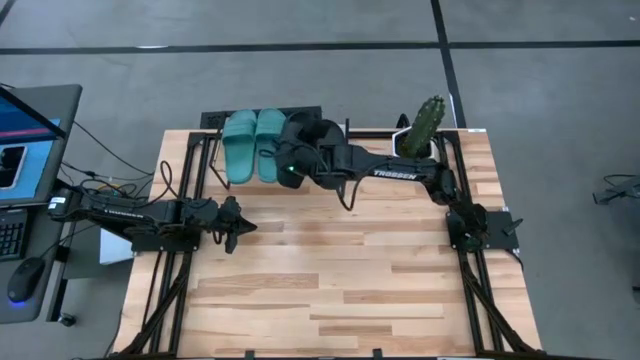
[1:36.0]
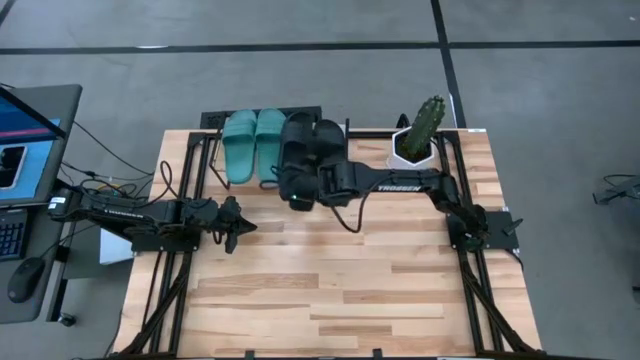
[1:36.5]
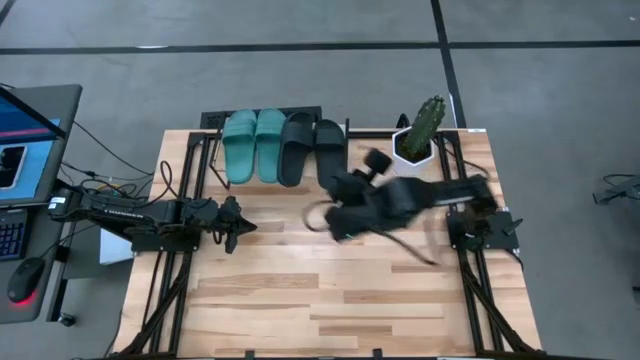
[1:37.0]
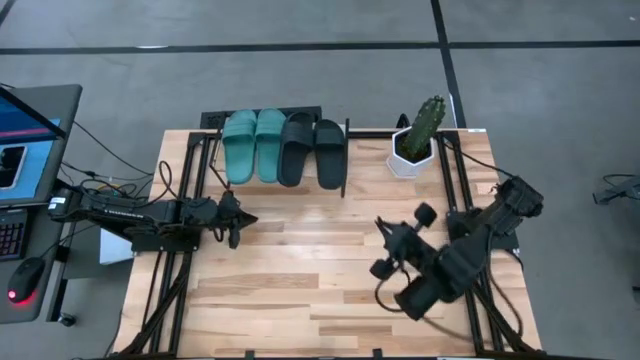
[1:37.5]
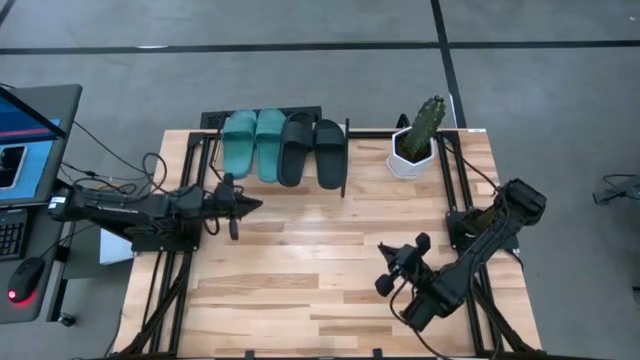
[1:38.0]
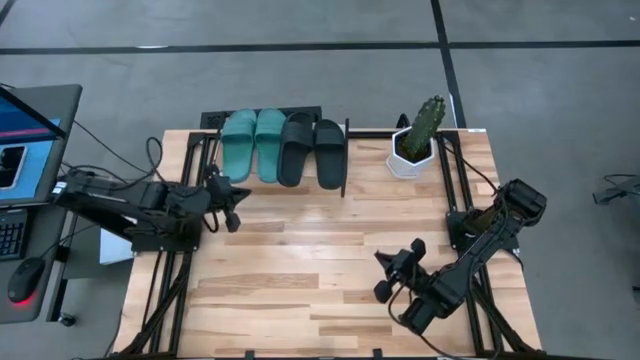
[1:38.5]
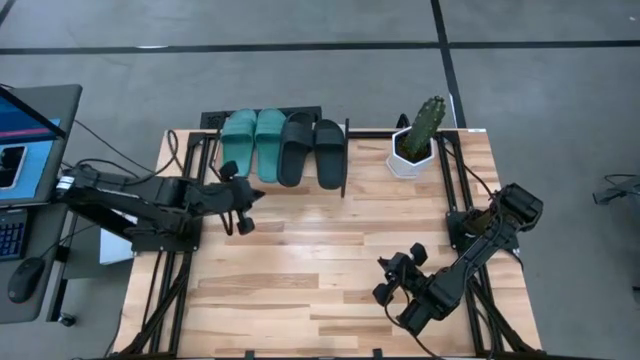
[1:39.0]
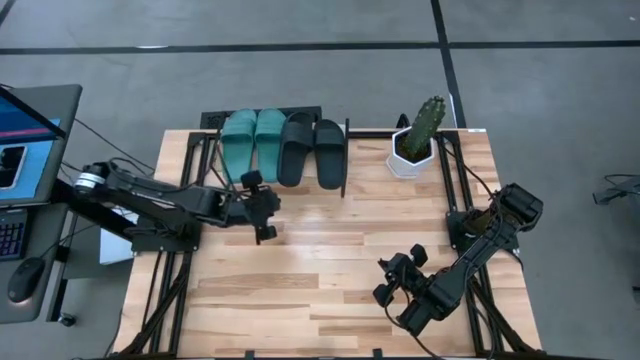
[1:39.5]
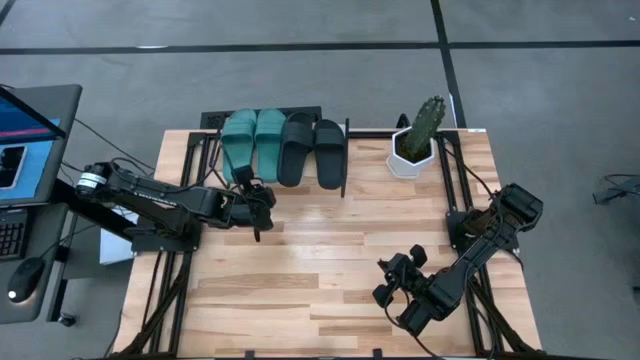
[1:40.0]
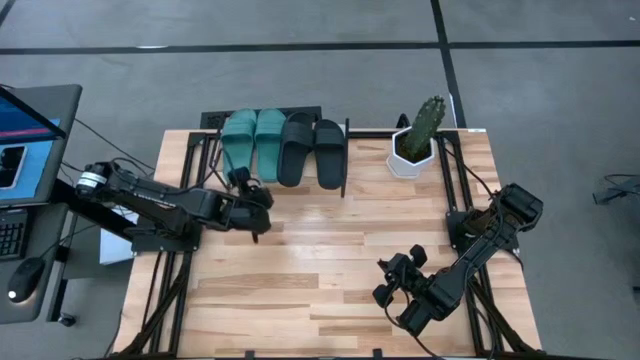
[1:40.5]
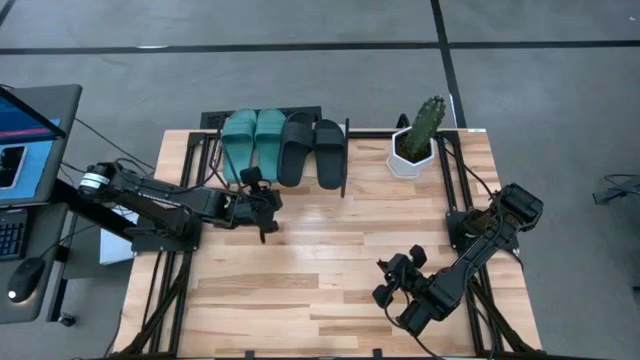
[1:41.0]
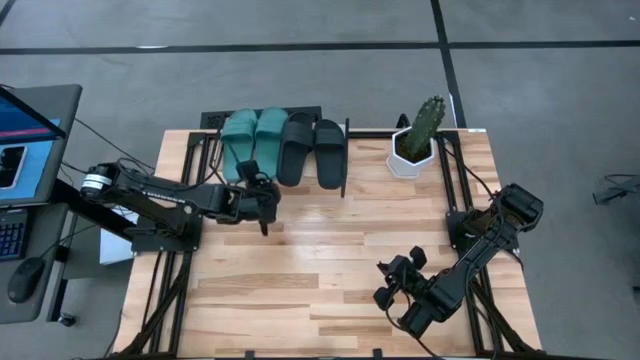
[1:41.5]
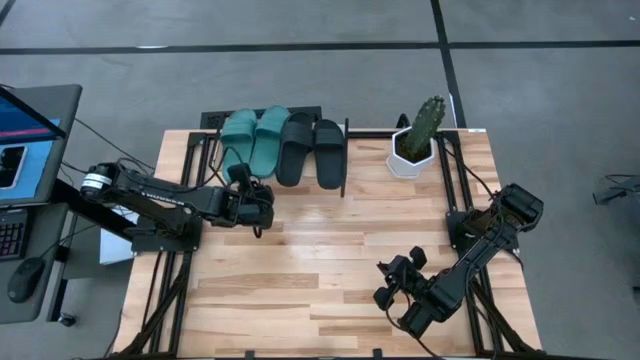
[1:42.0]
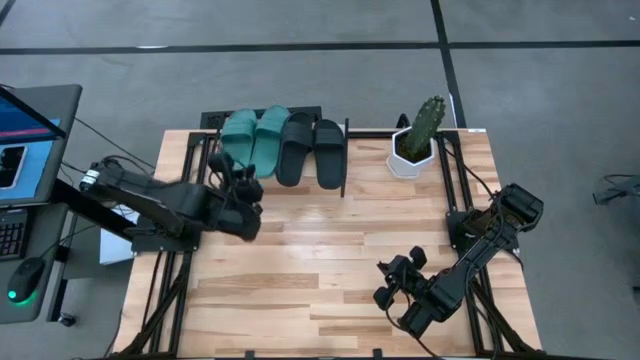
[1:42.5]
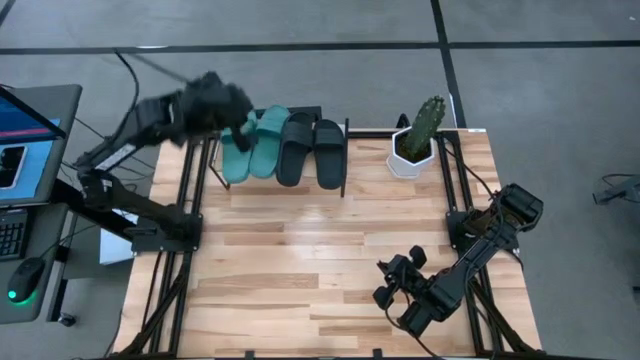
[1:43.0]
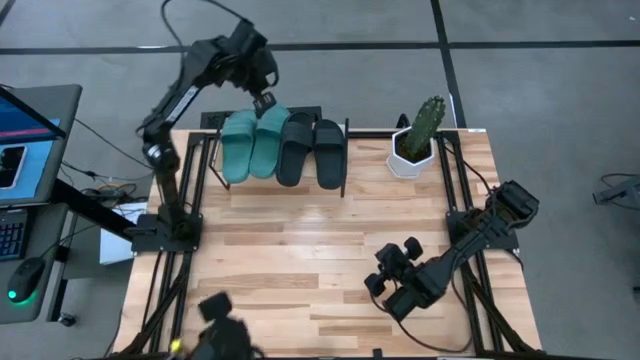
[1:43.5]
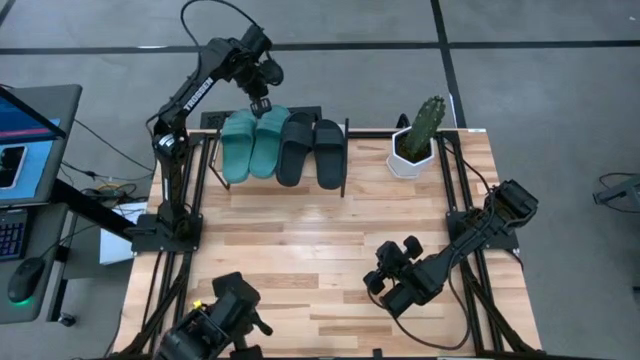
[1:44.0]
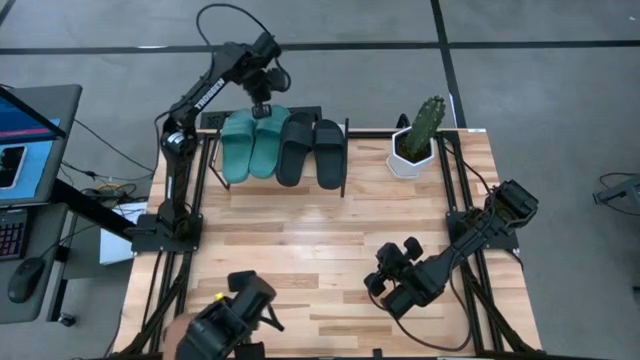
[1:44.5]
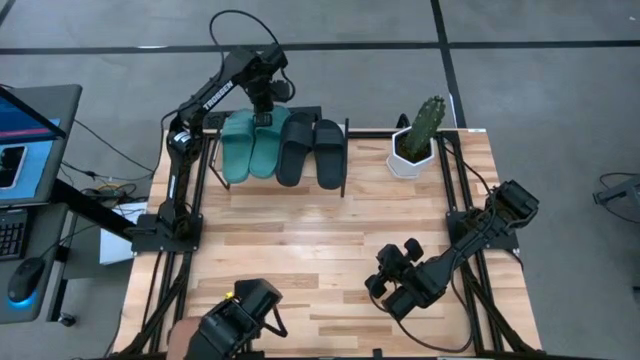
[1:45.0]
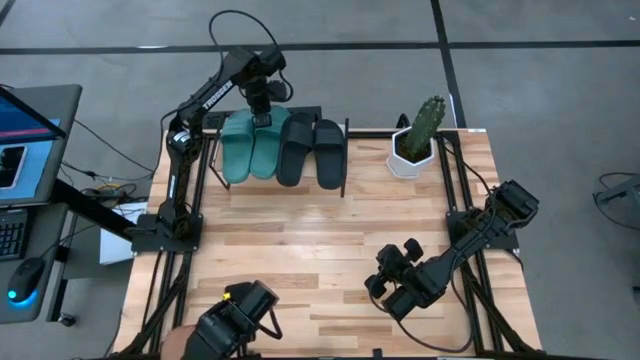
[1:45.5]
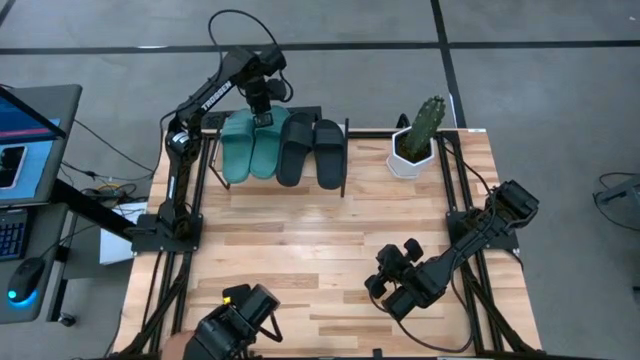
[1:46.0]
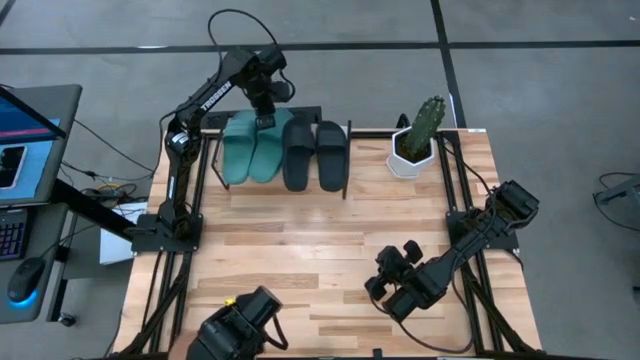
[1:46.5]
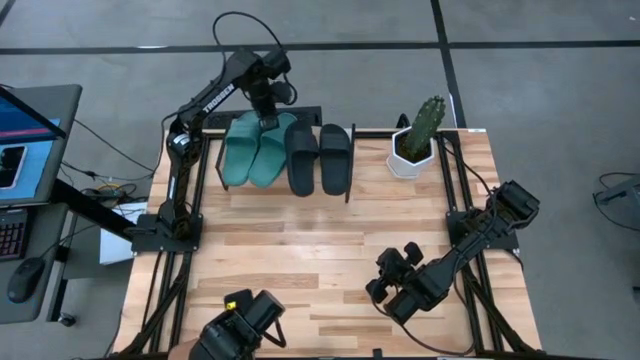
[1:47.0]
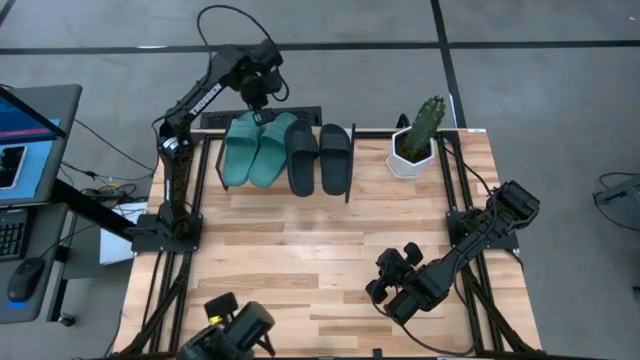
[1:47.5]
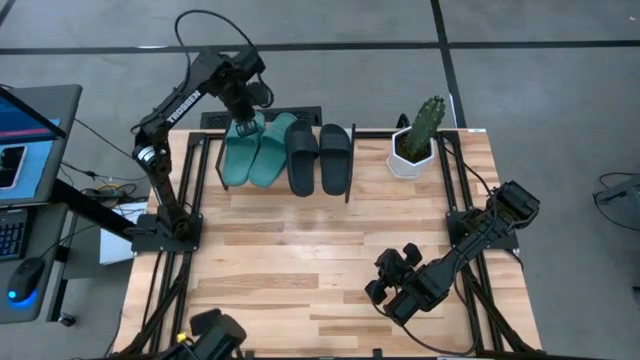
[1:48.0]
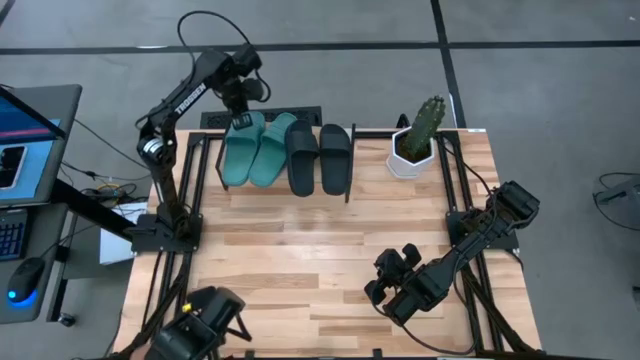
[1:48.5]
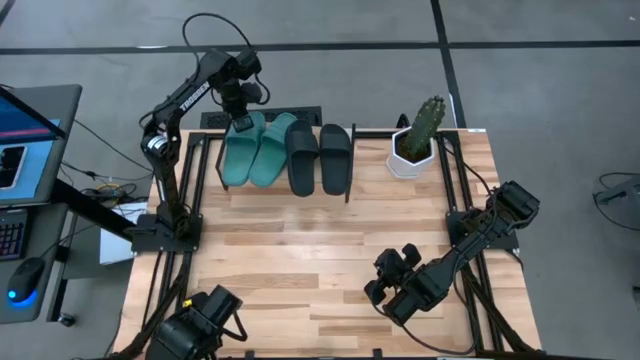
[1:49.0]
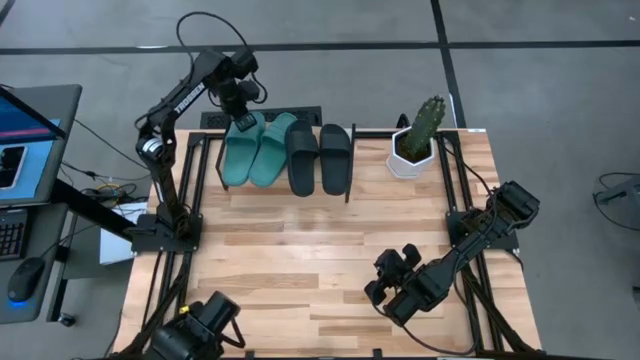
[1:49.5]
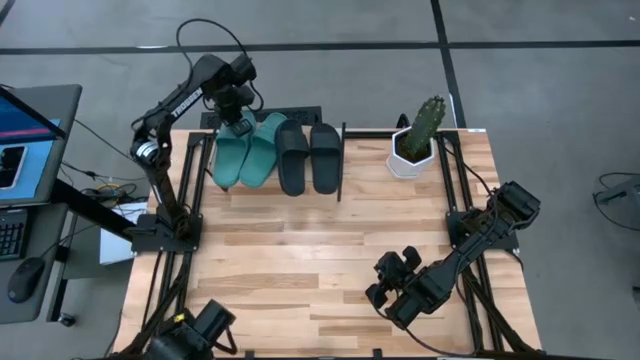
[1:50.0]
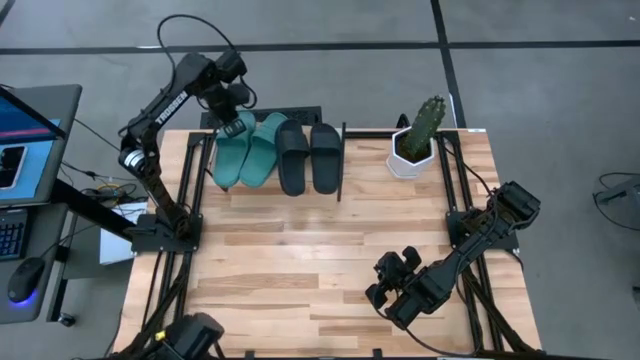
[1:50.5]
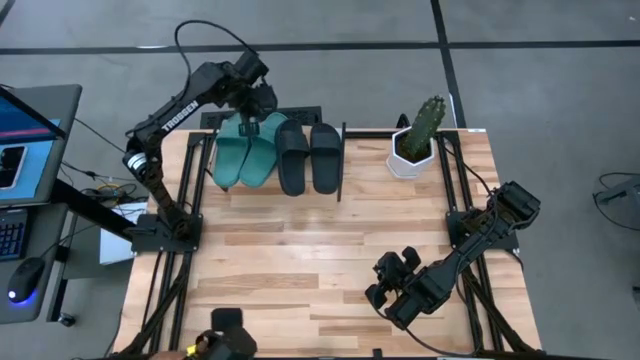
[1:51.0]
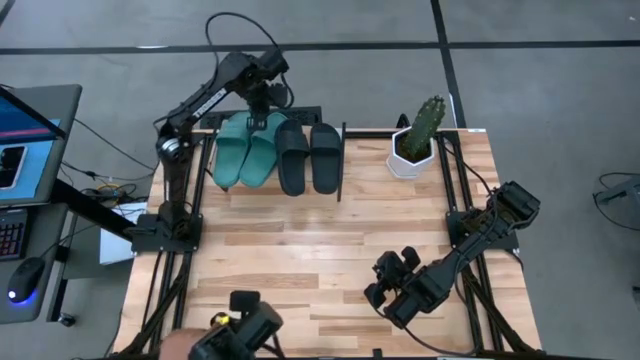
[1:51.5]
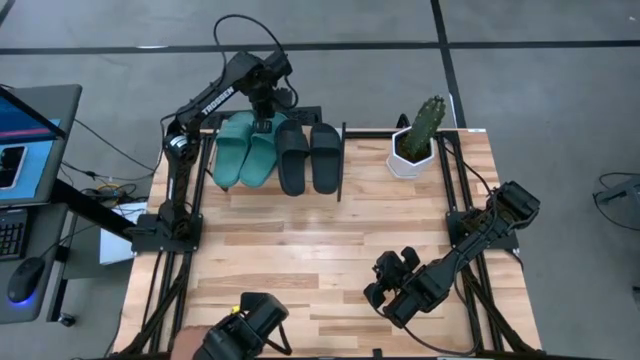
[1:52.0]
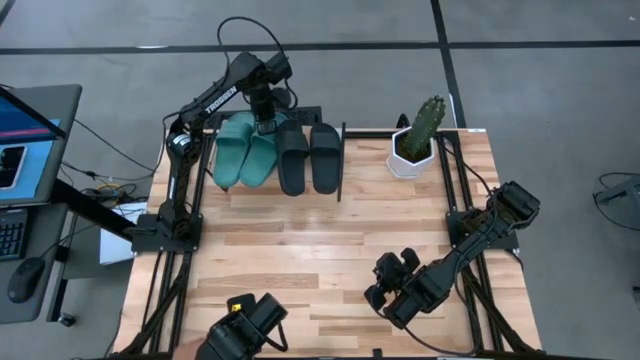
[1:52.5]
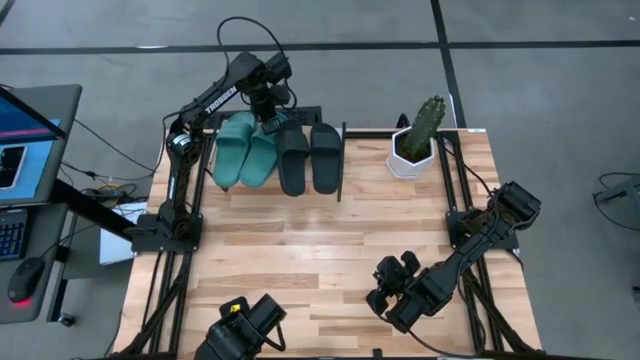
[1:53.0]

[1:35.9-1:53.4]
Task: Pick and place slides into the shelf
Adjust the slides on the shelf

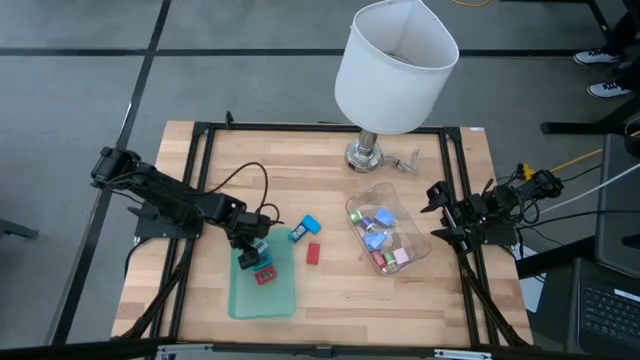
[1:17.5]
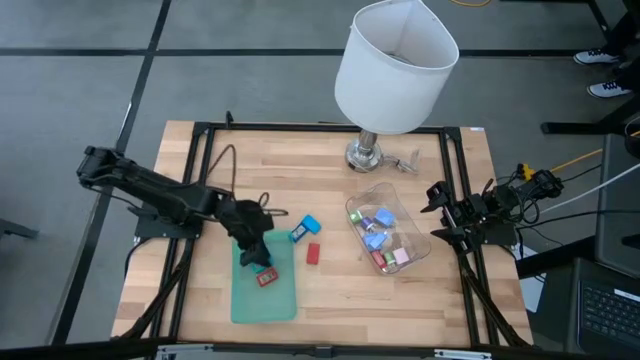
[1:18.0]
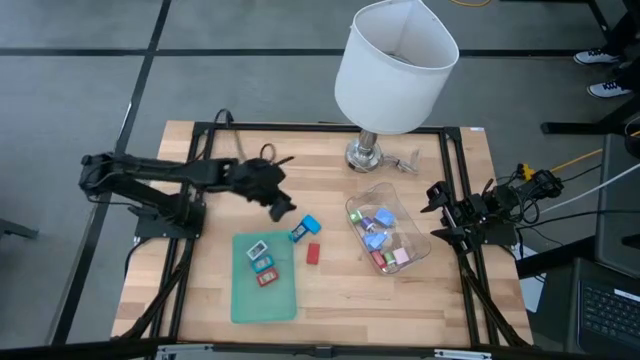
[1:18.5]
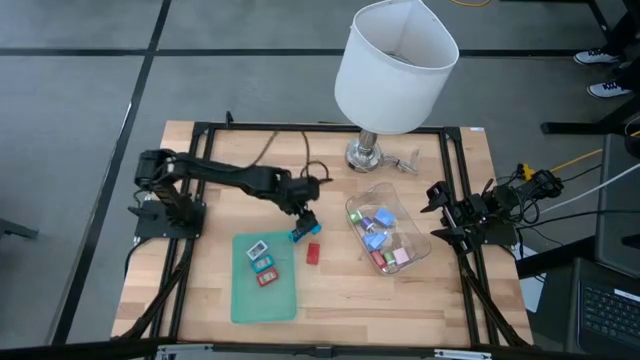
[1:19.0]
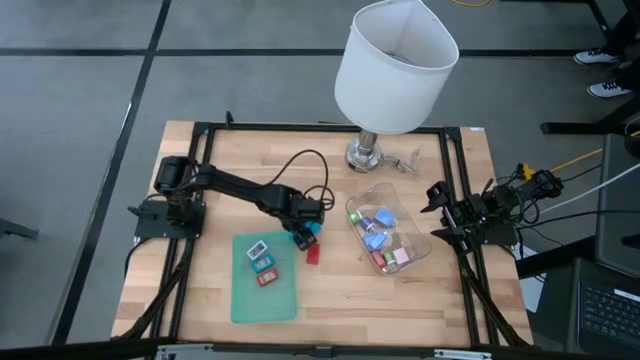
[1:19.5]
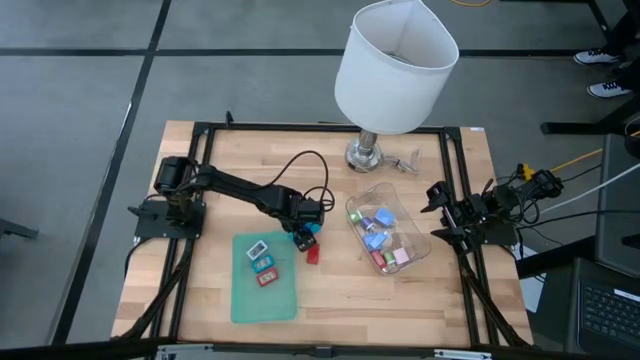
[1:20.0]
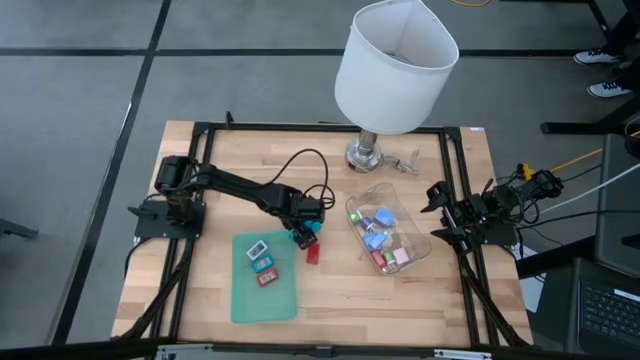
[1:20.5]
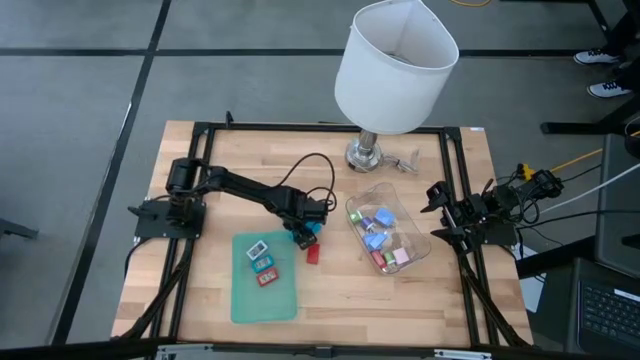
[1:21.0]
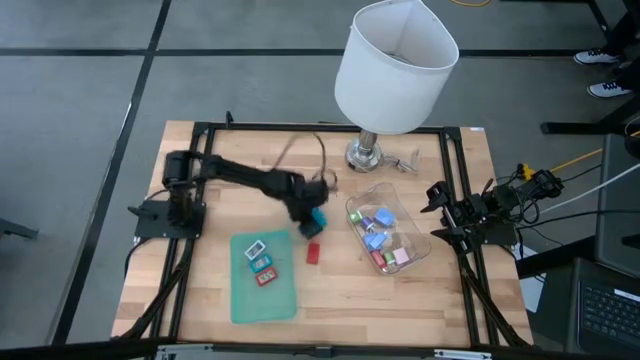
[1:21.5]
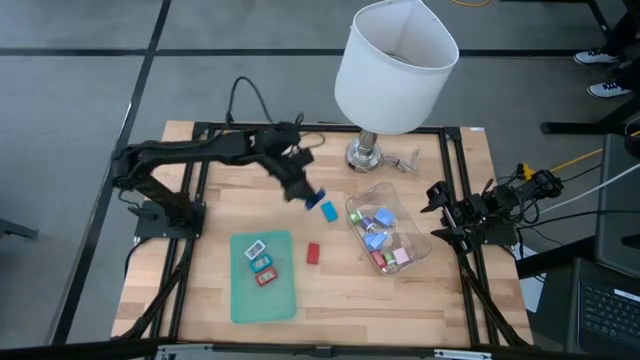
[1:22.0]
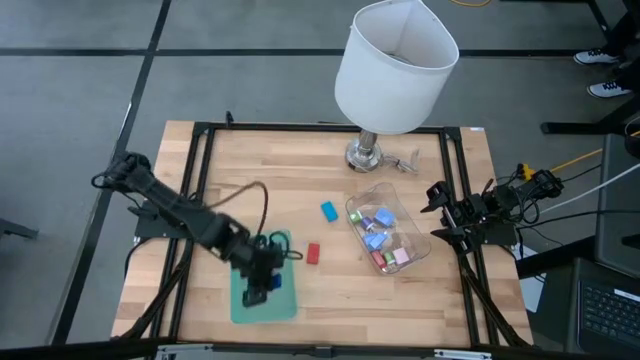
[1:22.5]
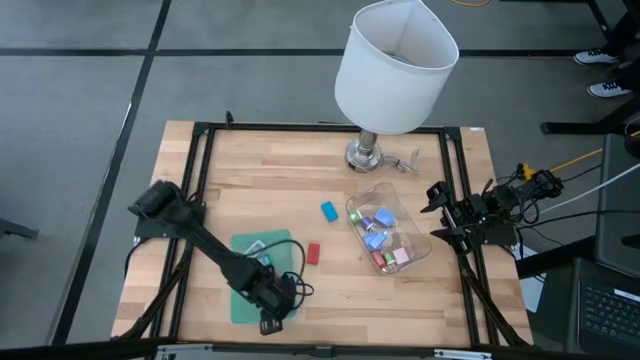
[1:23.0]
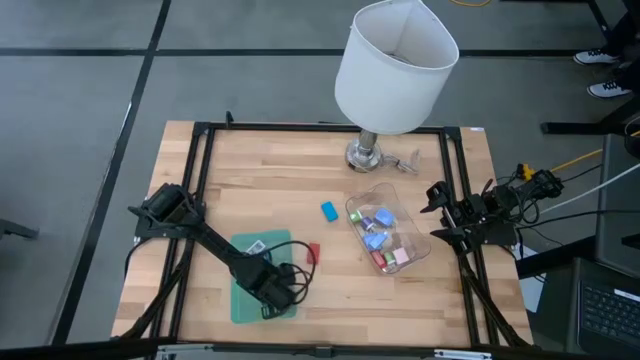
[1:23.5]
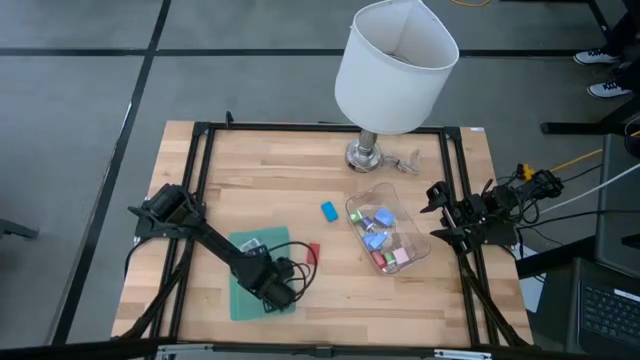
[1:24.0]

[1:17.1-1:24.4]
Task: Pick & Place Office items
Put the blue digital clock into the green bin
